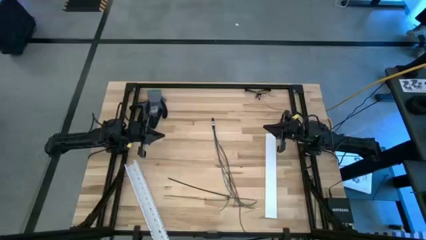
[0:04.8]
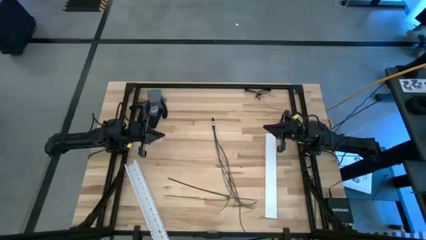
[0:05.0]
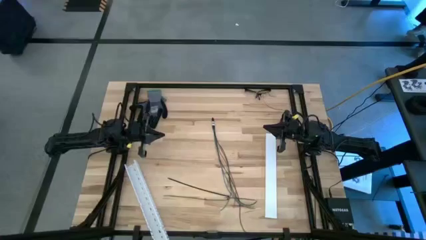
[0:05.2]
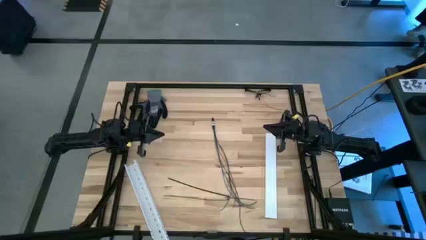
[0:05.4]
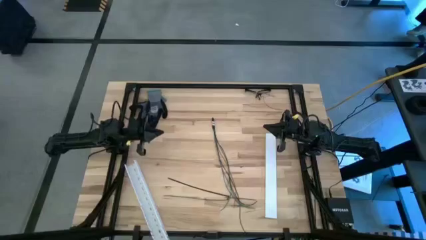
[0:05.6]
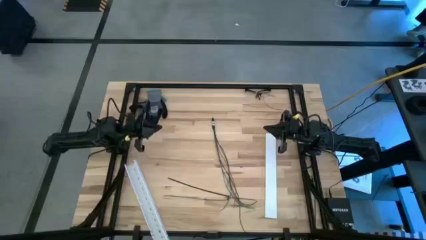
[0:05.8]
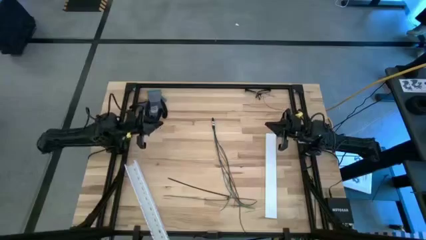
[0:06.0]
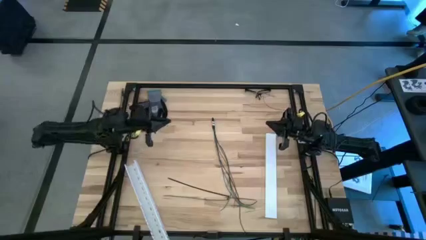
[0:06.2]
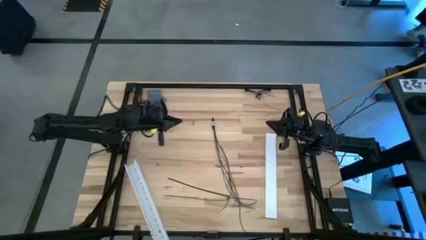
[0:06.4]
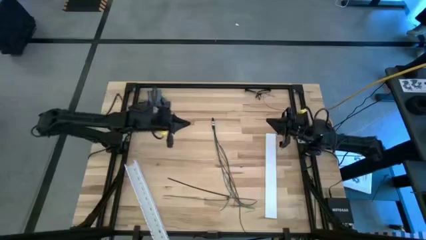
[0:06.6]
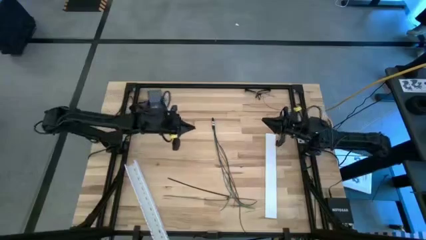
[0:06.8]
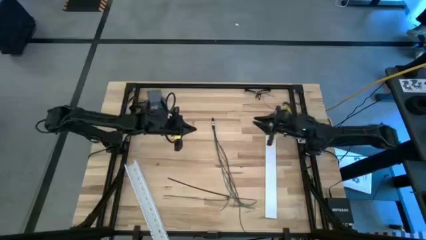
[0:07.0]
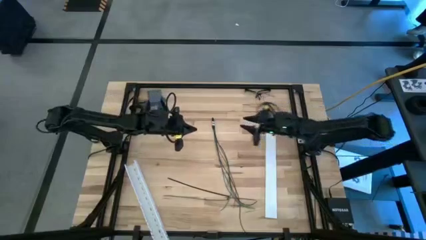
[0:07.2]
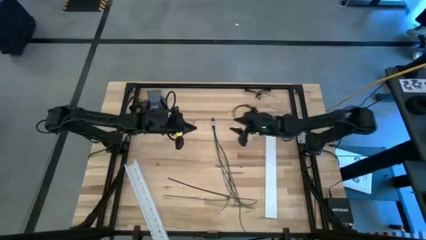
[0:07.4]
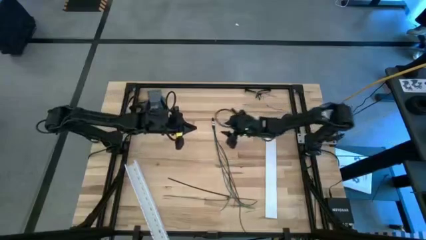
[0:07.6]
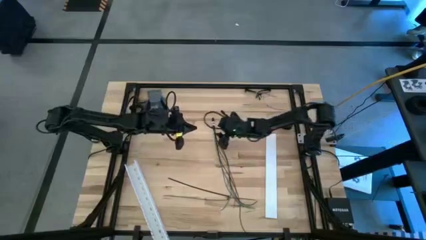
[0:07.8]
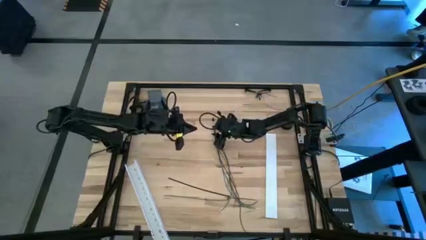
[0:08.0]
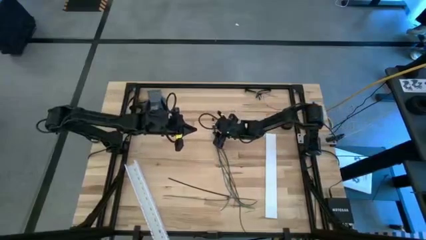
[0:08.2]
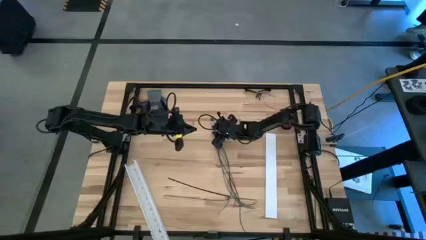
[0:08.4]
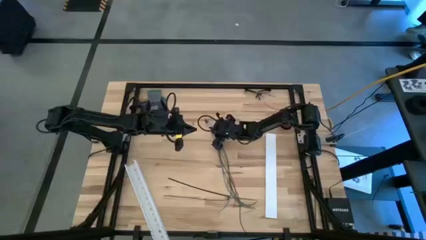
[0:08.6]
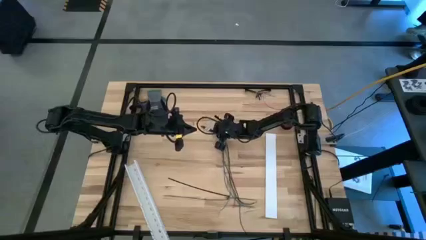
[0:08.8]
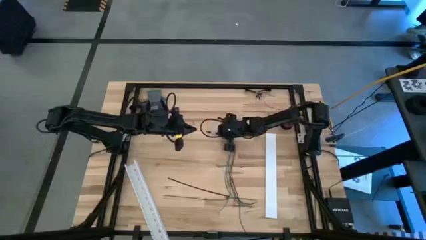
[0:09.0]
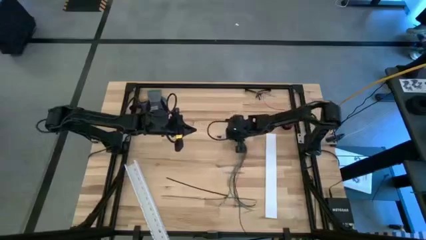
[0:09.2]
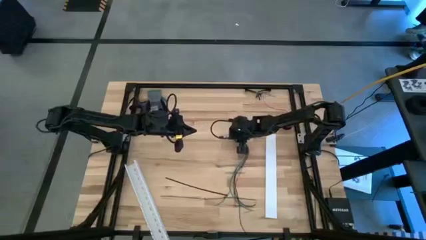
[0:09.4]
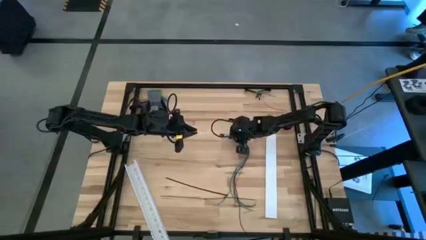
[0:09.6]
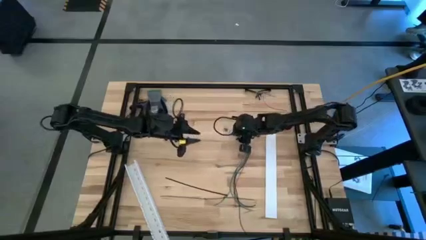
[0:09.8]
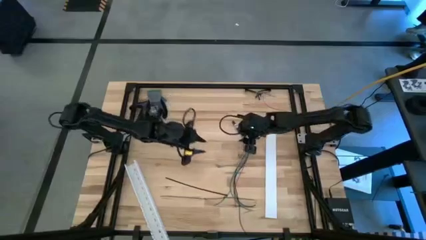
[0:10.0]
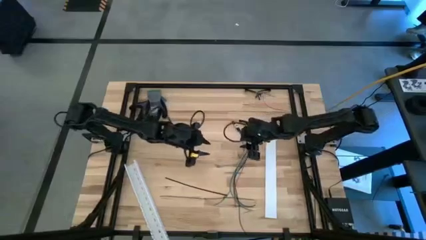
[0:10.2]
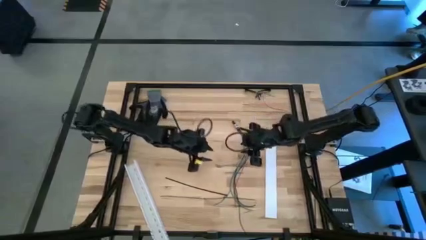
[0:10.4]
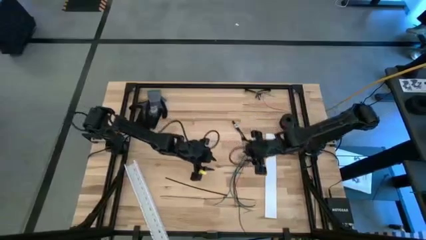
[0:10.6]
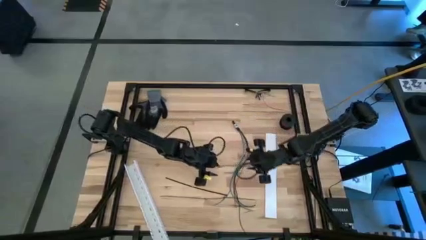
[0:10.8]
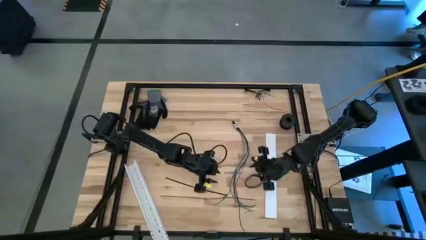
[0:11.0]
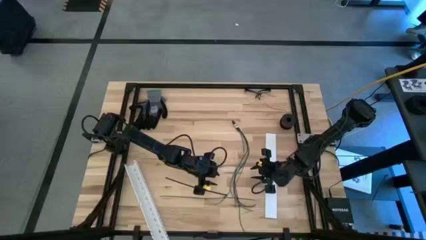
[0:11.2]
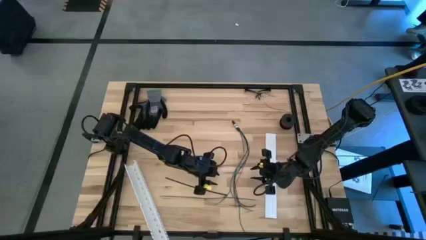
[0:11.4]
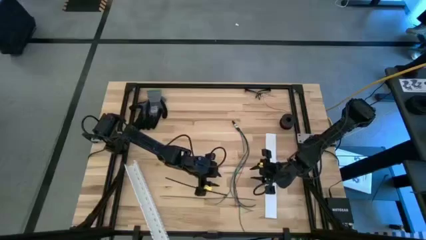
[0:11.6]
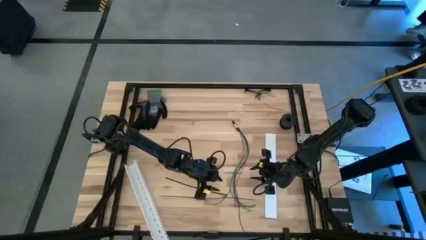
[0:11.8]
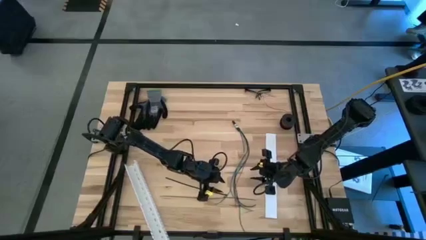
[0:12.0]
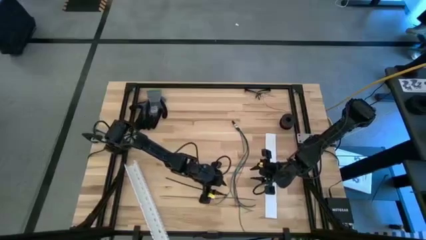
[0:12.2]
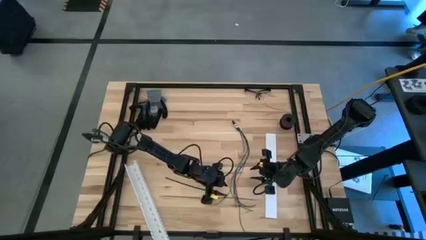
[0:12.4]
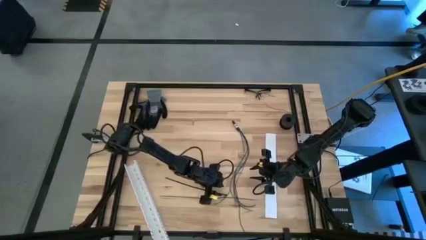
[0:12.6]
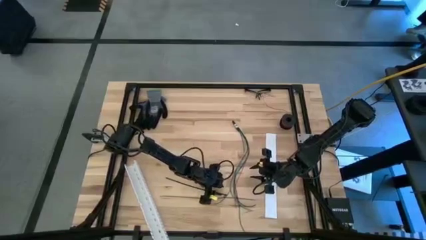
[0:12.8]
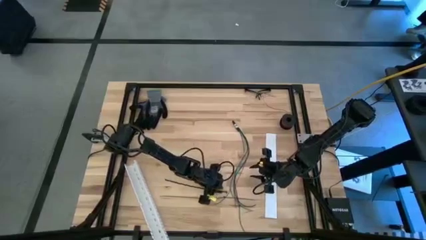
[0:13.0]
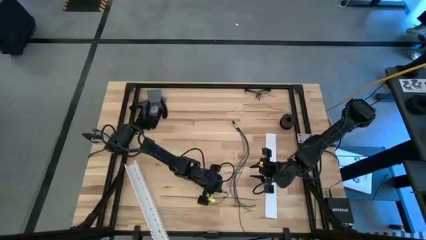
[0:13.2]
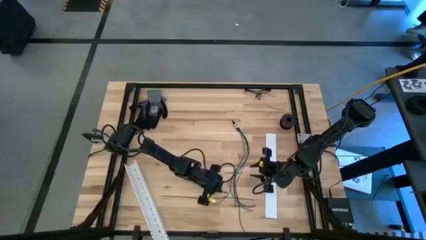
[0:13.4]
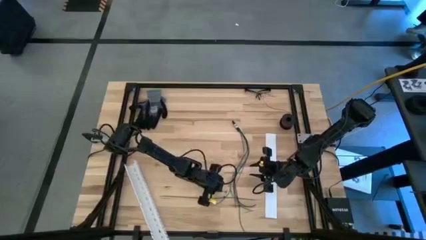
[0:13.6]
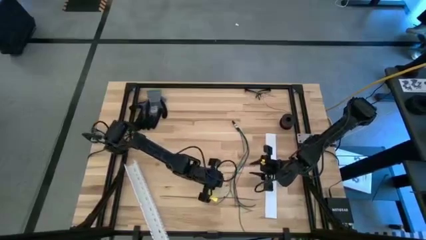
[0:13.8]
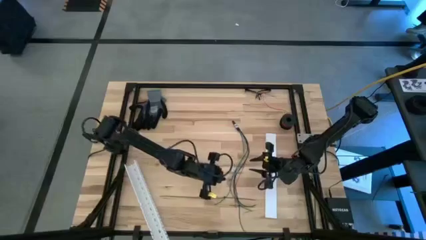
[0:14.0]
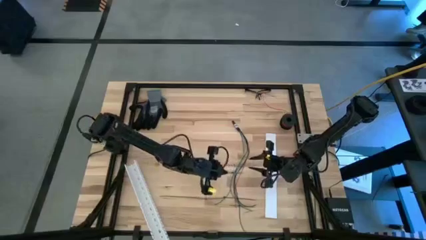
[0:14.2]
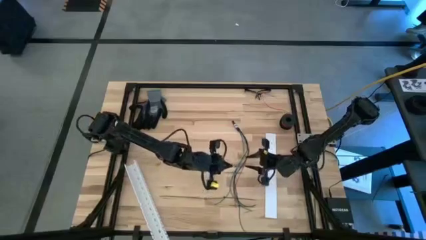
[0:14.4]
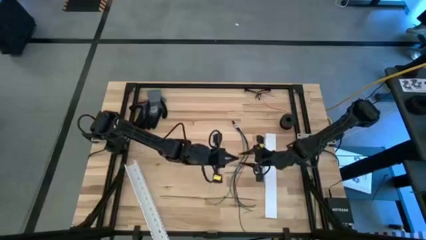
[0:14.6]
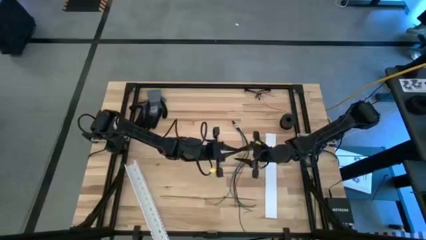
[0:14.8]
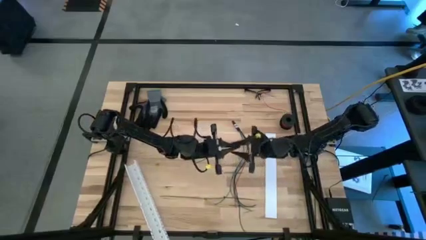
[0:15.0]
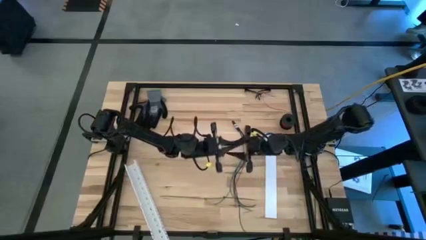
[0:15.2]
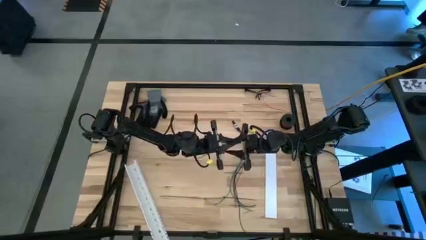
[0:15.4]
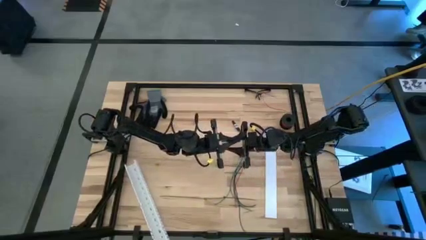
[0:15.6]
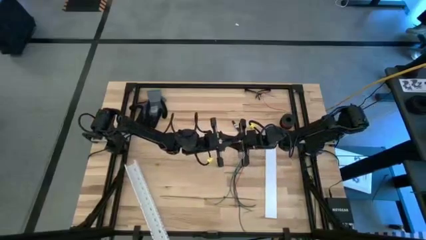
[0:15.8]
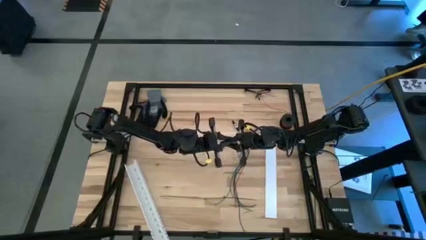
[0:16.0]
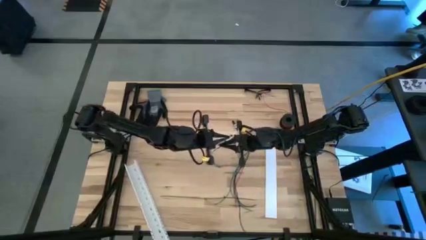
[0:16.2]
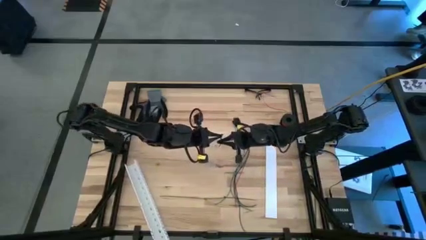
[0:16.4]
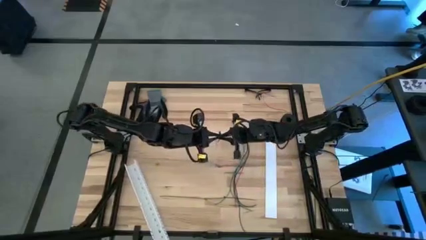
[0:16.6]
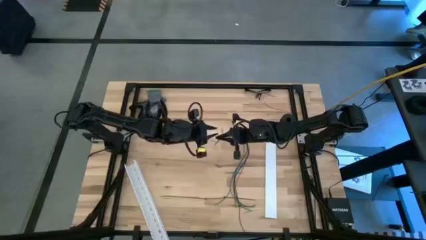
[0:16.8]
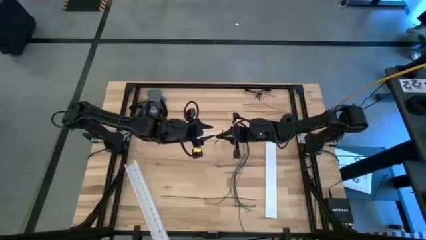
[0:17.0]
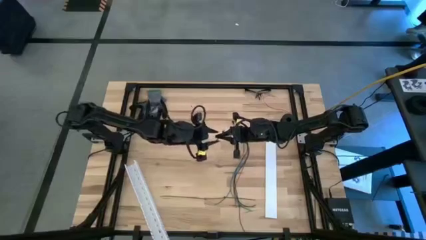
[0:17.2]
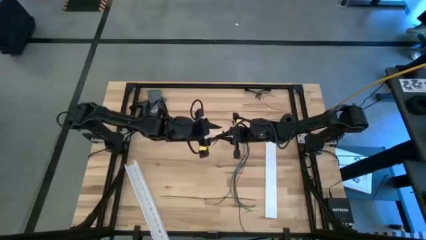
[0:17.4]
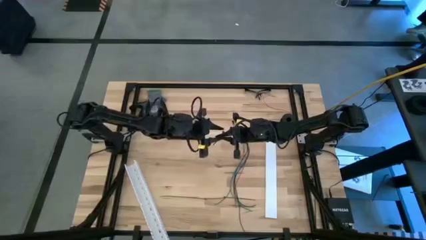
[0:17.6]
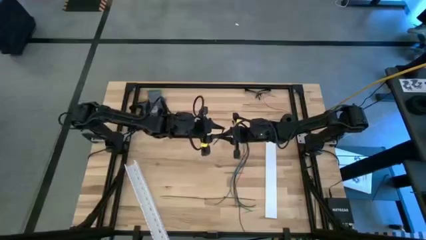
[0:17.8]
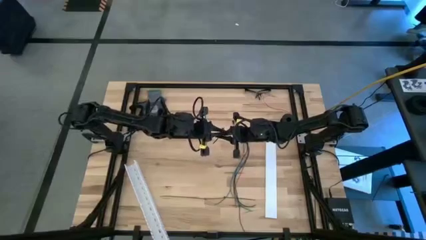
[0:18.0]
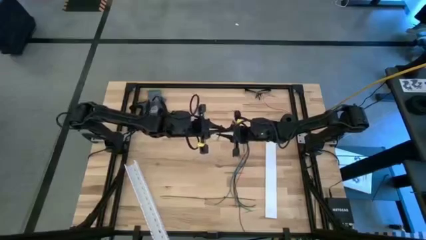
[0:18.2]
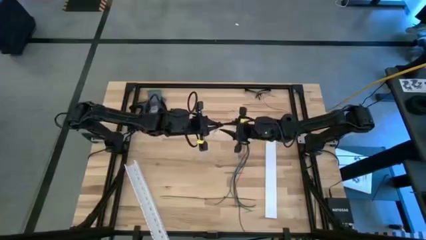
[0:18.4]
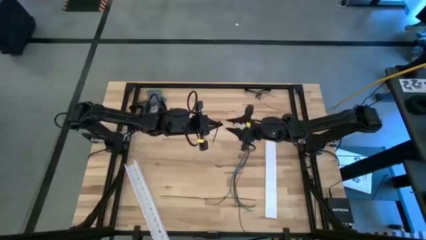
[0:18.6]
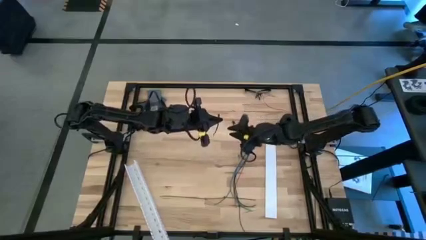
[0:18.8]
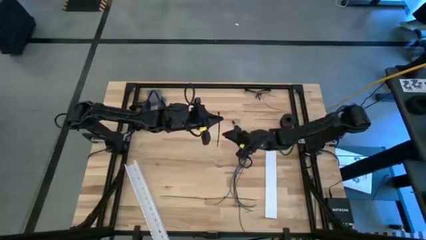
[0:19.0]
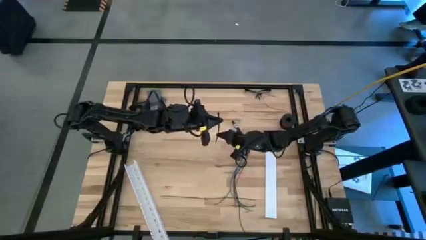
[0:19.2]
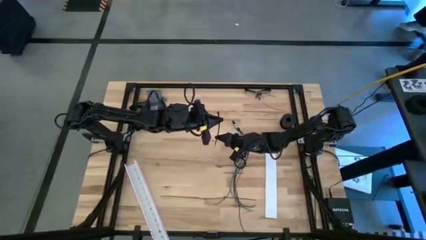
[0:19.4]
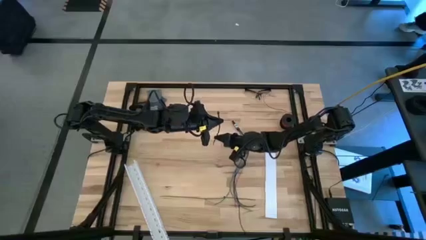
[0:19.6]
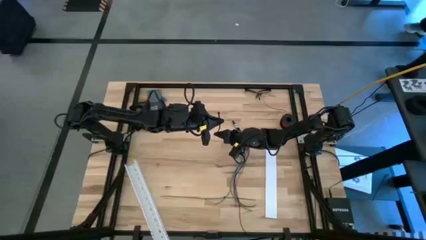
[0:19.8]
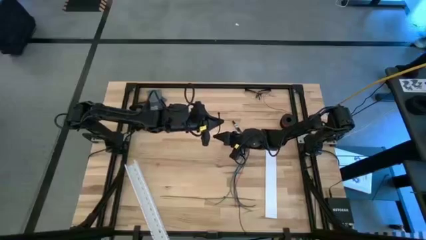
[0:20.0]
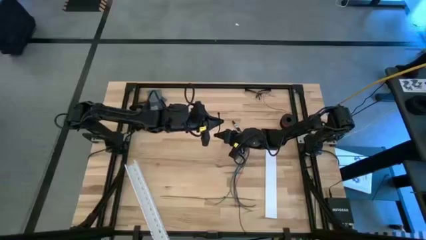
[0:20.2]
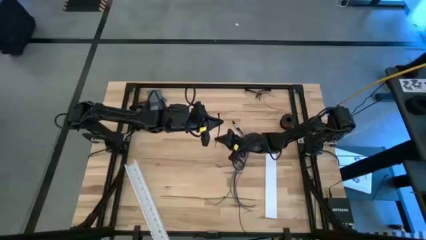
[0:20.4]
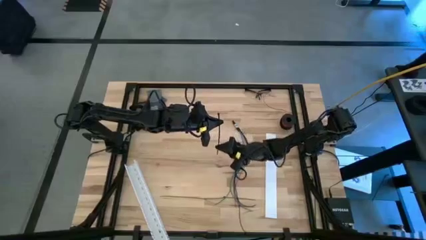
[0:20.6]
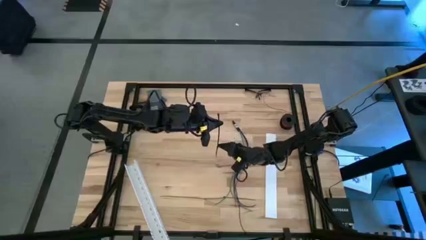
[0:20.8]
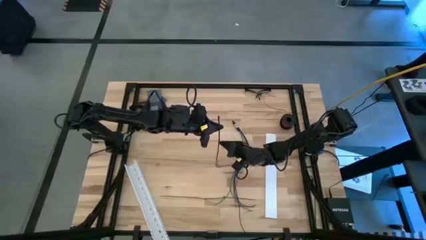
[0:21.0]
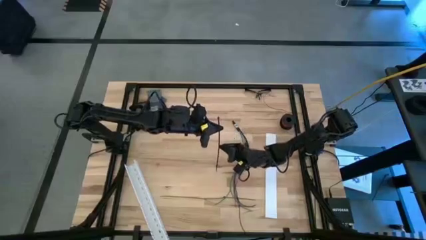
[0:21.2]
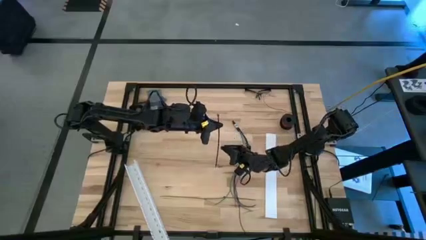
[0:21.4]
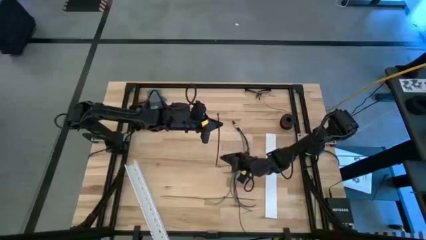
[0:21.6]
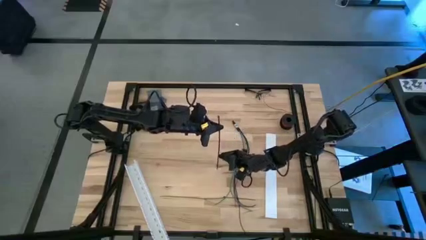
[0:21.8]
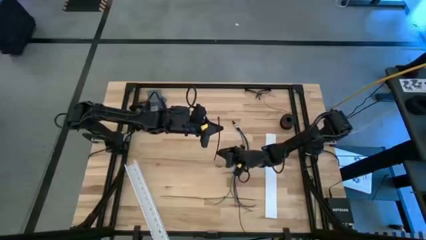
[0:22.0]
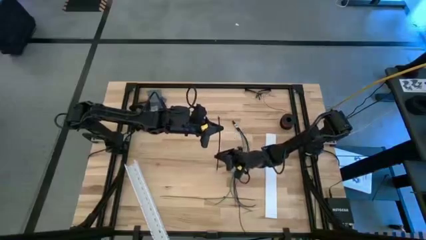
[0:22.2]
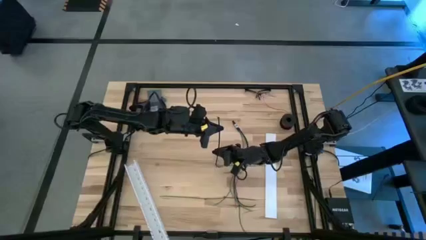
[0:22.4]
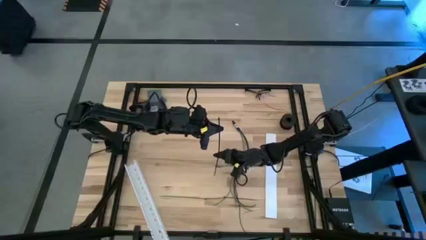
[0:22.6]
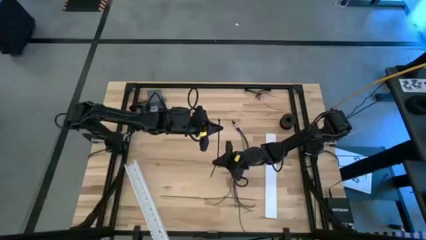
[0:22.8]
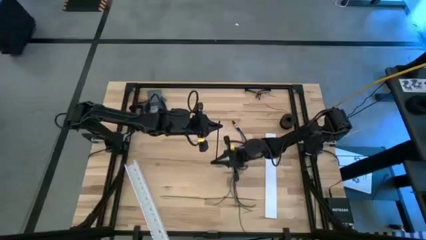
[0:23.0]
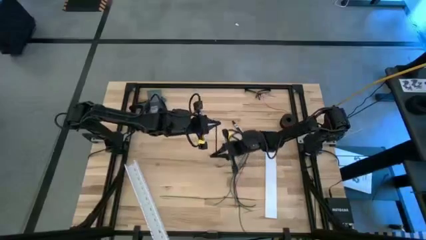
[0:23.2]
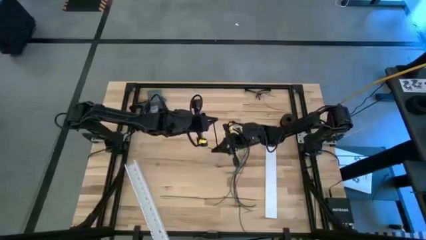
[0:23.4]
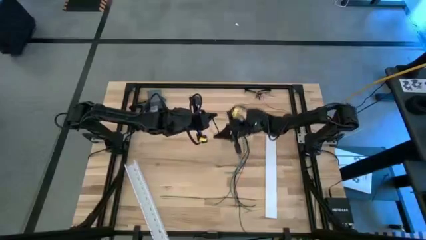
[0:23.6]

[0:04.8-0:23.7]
Task: Ziptie cables
Wrap the top black zip tie on the colored cables
